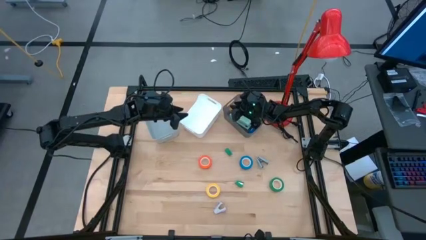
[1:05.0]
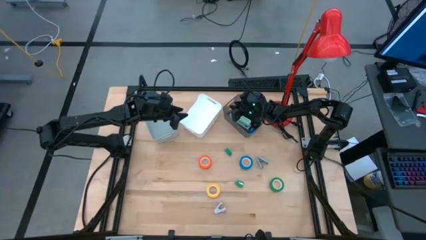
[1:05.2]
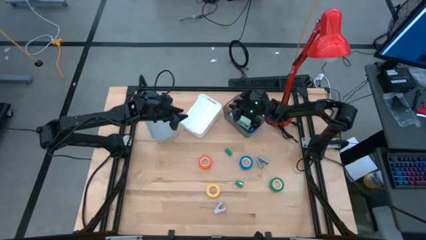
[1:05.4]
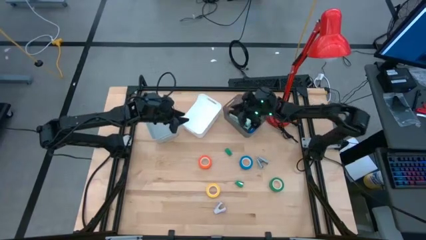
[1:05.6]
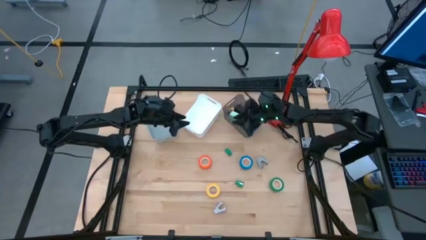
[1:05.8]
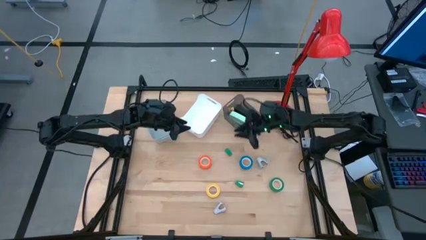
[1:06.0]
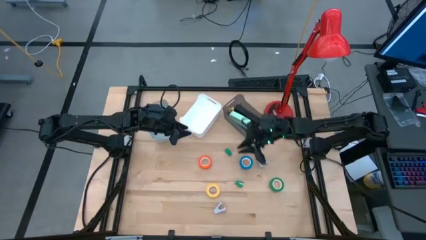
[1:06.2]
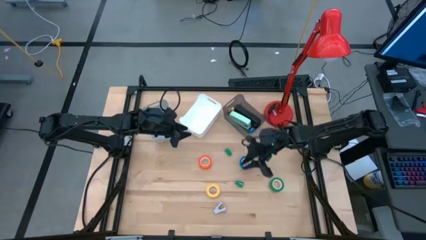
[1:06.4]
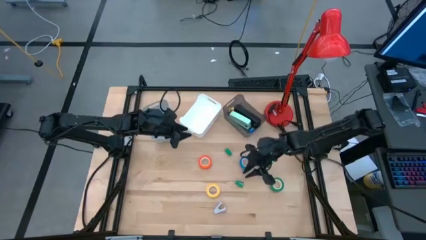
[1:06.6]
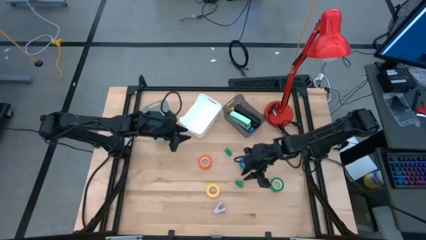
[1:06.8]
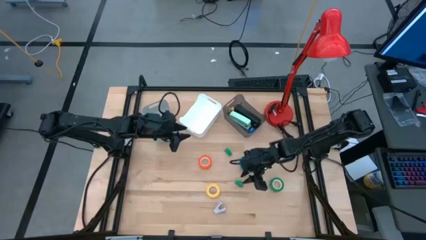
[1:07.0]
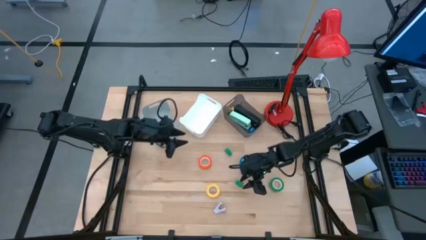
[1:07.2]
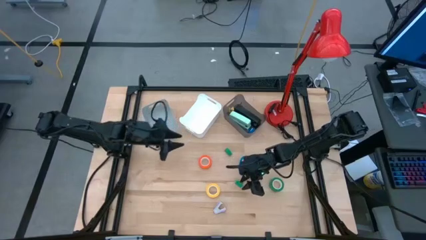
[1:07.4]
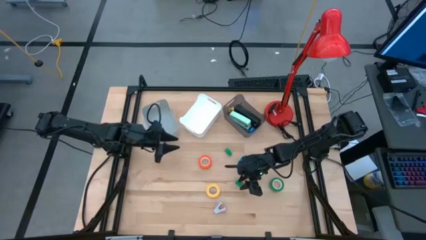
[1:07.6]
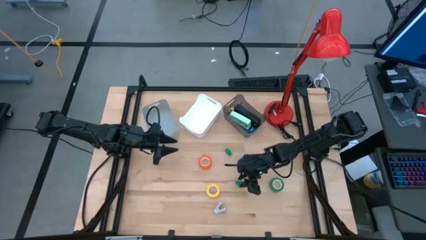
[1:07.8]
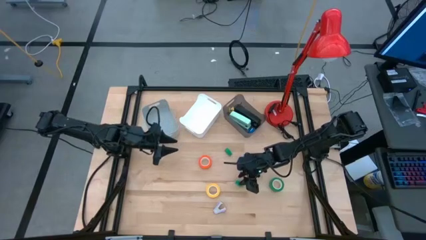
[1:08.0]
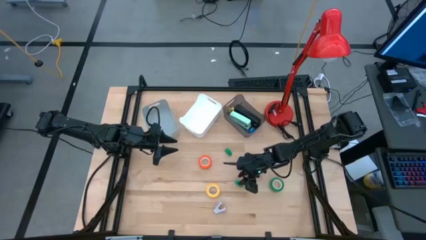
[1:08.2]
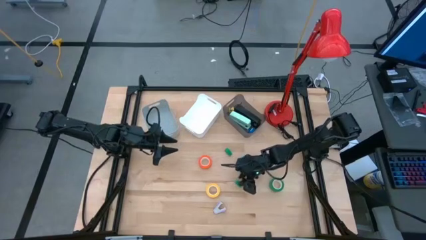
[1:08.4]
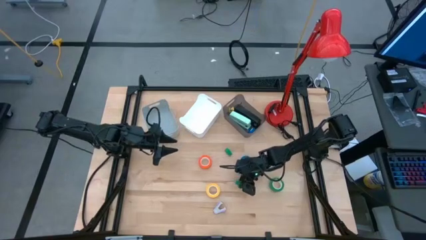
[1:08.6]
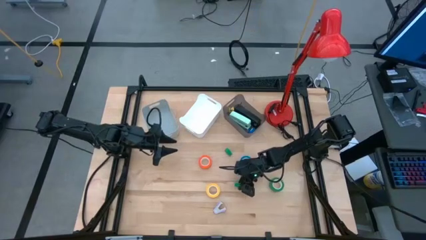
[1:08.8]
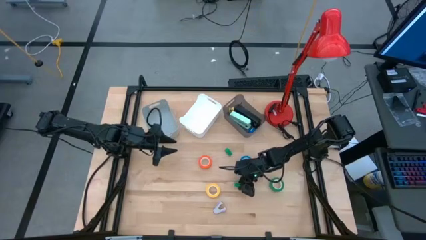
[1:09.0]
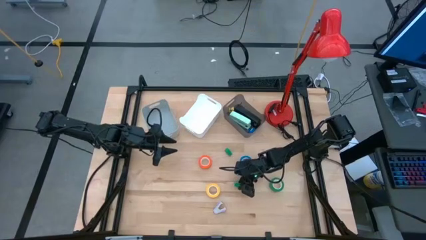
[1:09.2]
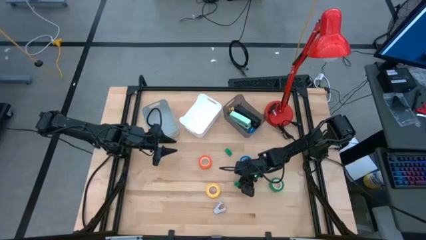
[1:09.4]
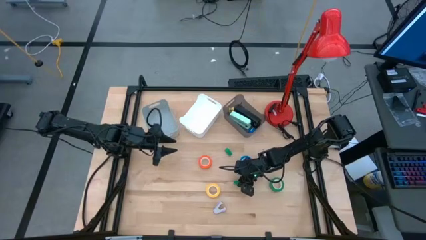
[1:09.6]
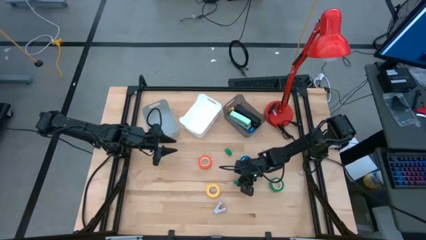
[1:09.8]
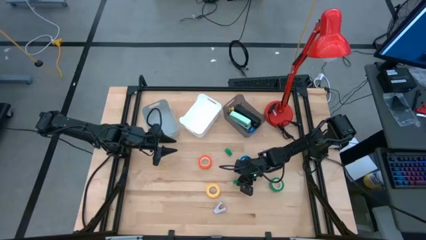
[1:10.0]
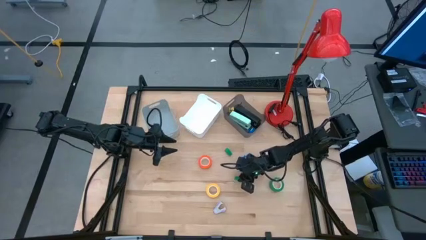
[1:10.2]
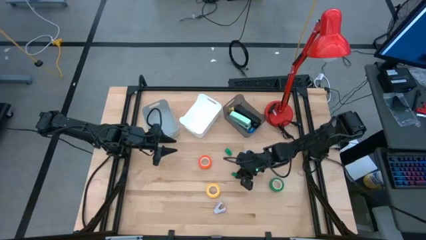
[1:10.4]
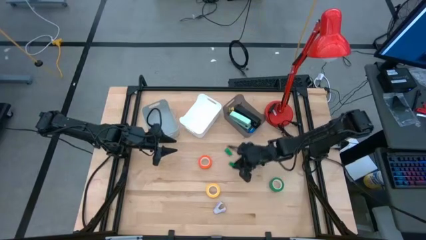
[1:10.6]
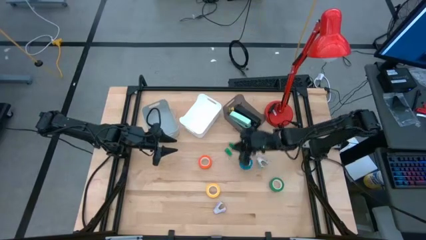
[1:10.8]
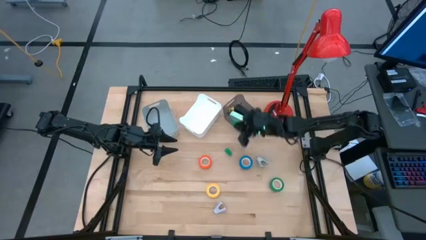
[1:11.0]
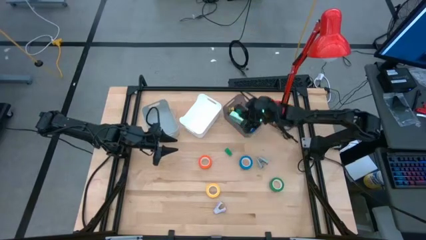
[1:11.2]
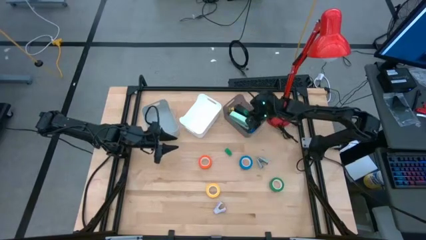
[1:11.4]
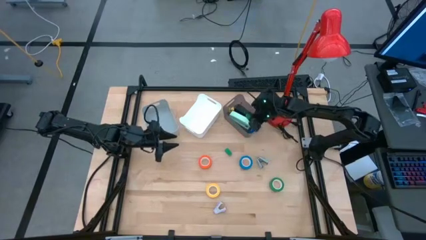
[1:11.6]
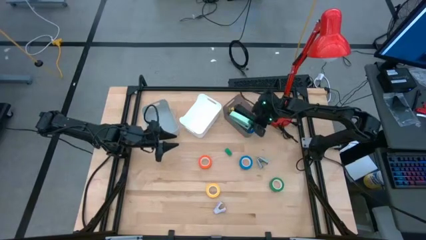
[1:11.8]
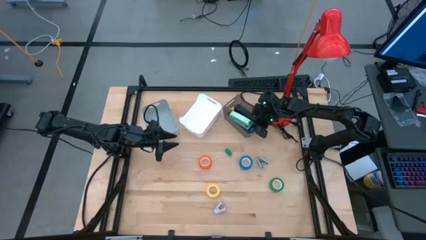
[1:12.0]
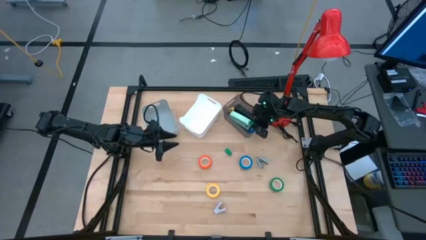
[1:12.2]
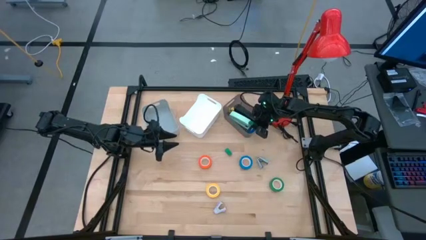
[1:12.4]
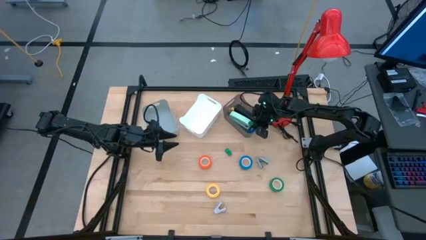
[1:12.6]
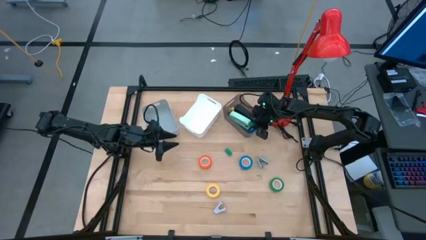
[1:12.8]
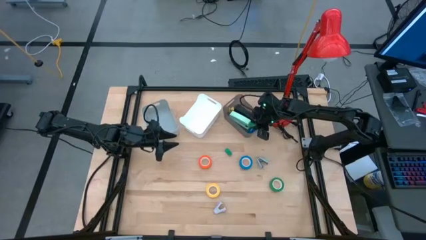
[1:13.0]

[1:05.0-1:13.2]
Task: Pick and place Stapler, Stapler remover, tape
Put the bottom green stapler into the black bin
